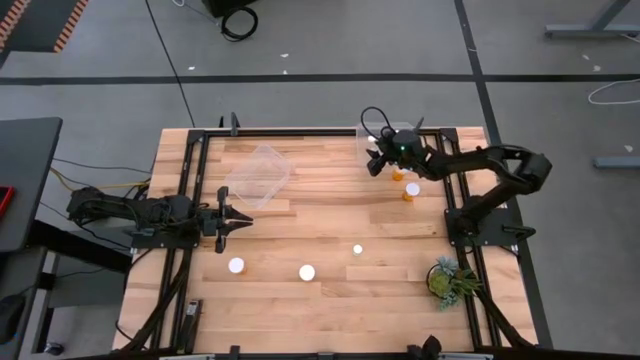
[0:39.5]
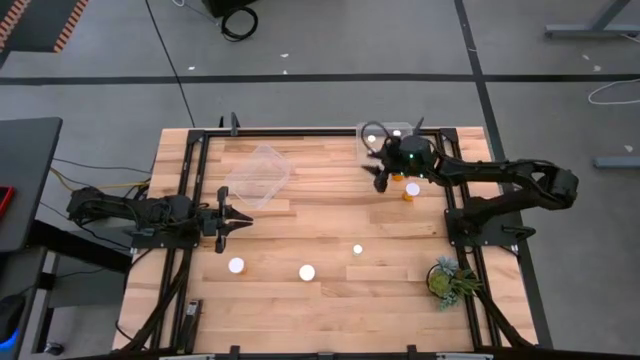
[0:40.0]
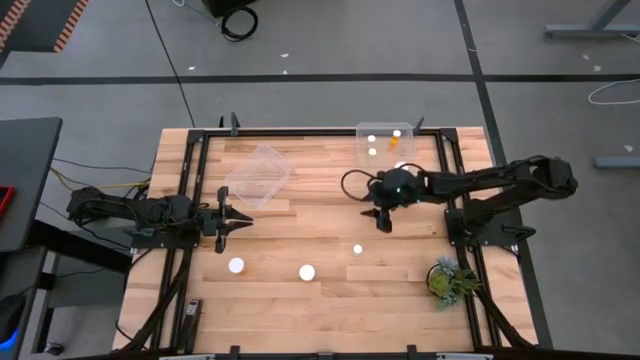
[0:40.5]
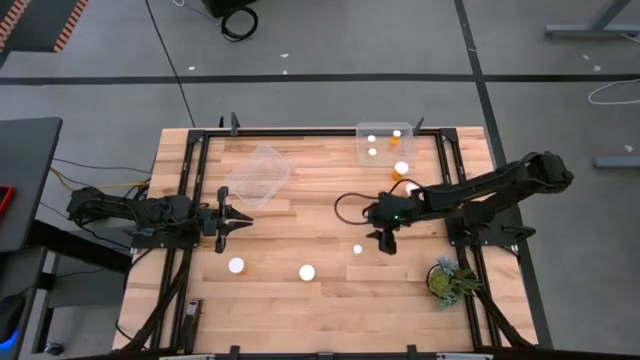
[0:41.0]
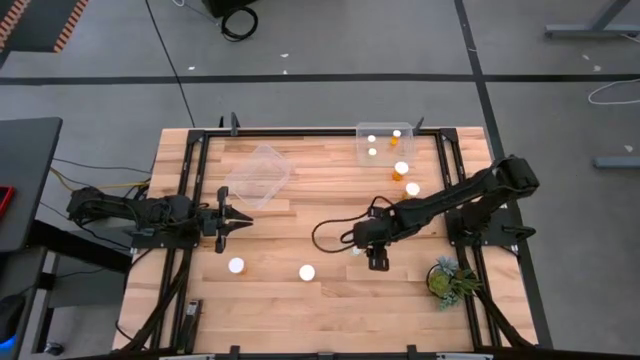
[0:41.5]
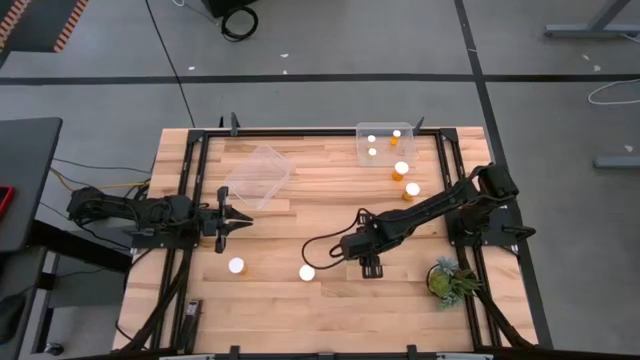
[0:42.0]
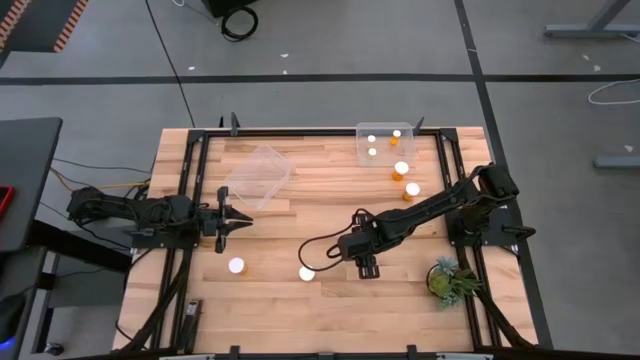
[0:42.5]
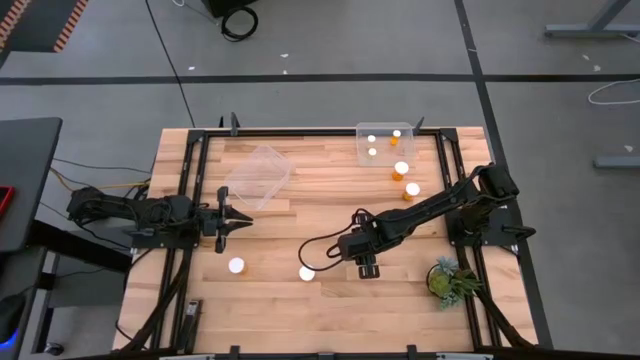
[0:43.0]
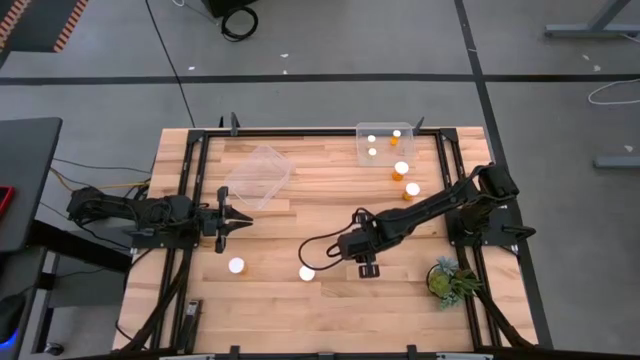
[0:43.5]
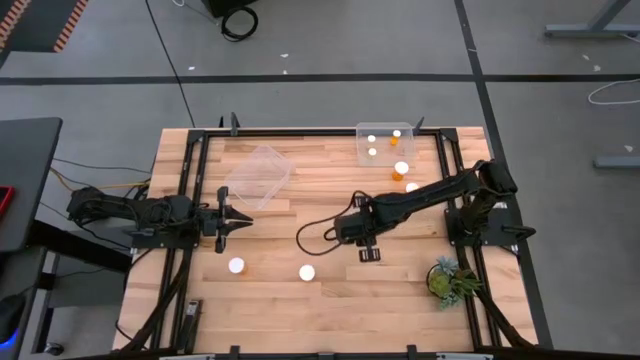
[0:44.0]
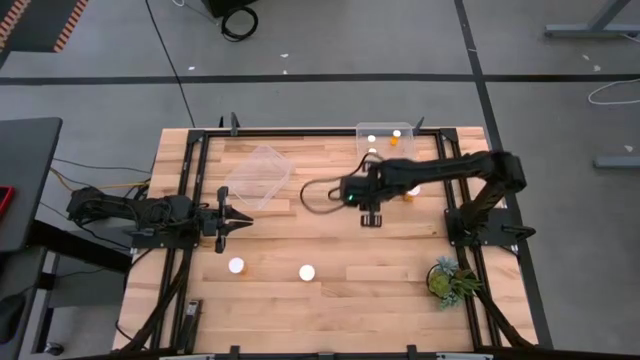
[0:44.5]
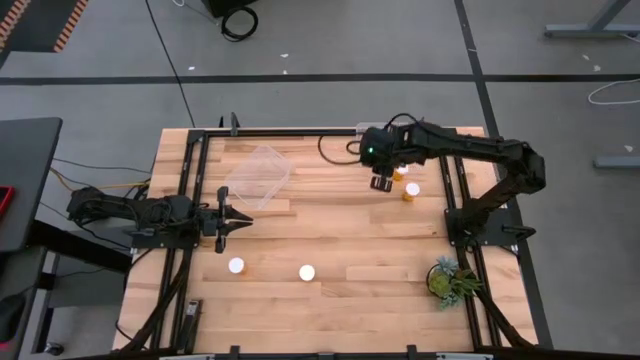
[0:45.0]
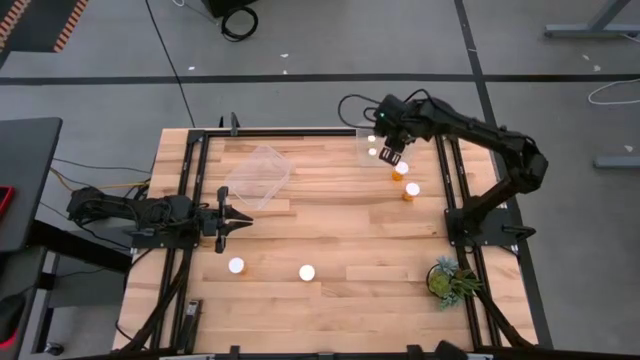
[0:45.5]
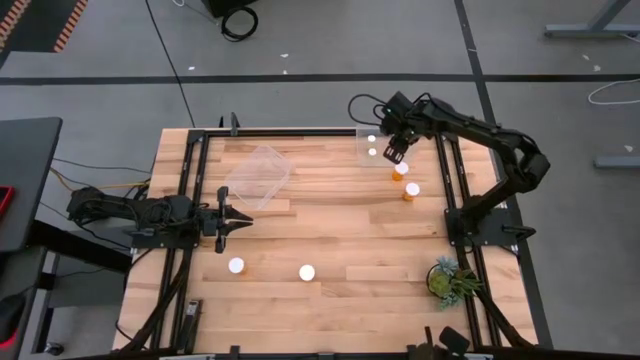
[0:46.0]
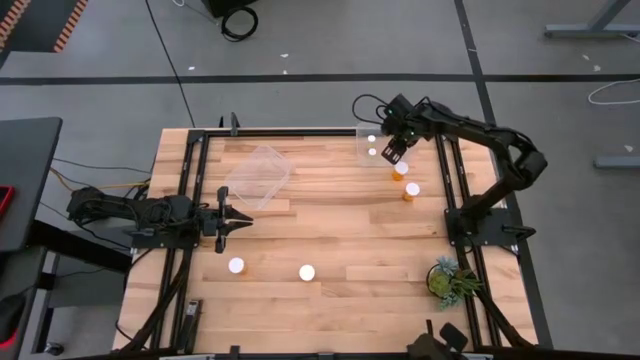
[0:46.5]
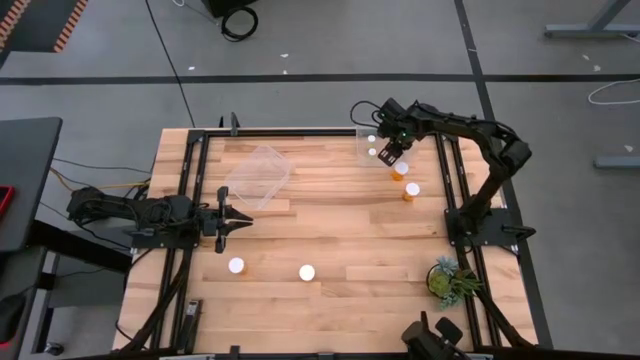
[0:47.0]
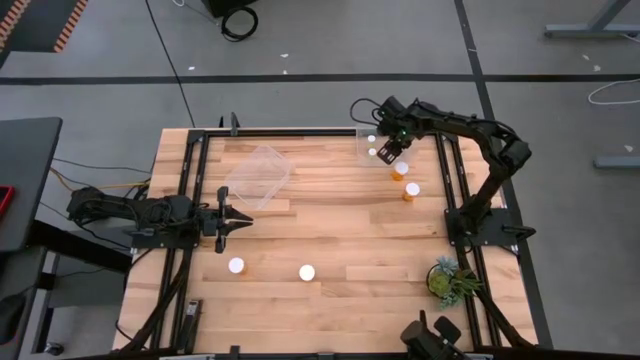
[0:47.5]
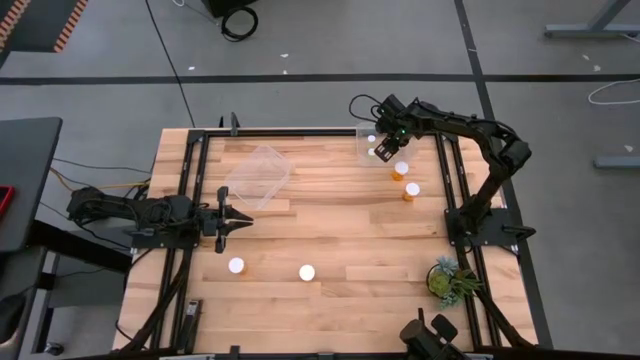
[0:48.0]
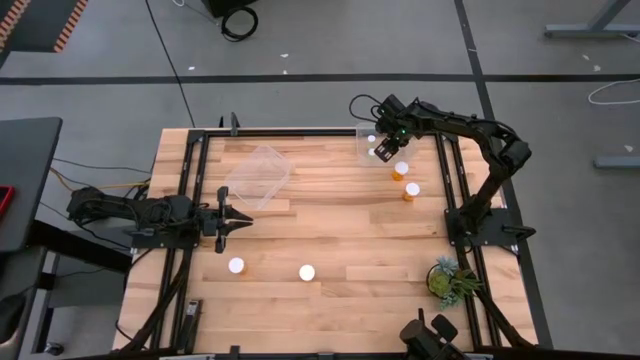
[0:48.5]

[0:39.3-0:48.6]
Task: Pick and place medicine bottles into bin by pill shape (circle, oval)
Put the wide yellow pill bottle into the right transparent bin

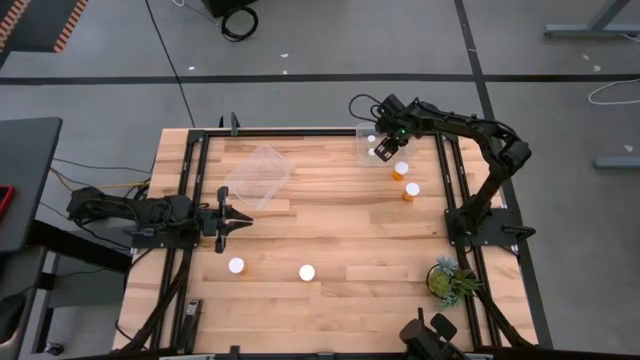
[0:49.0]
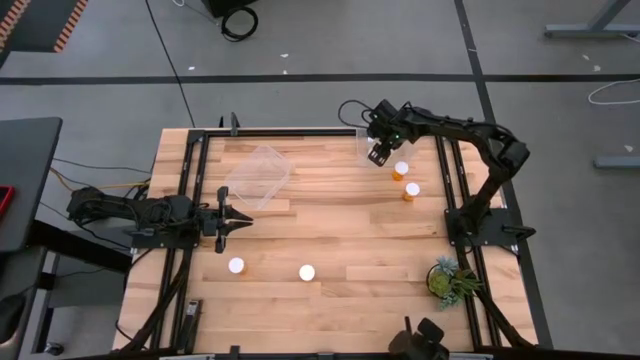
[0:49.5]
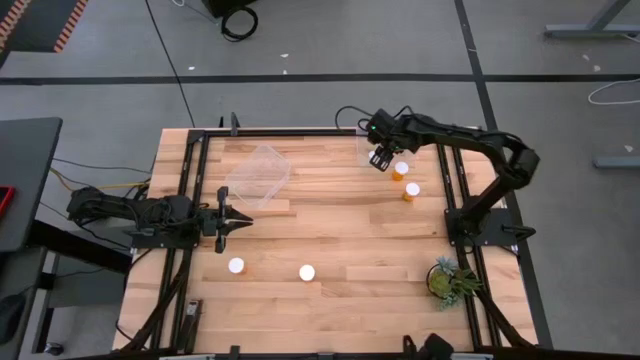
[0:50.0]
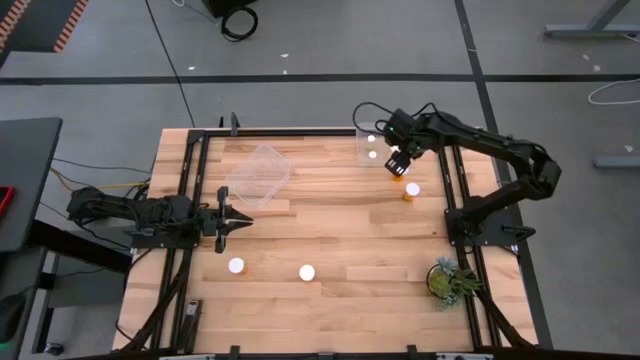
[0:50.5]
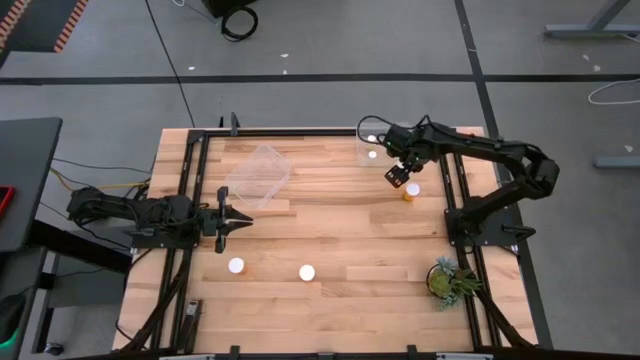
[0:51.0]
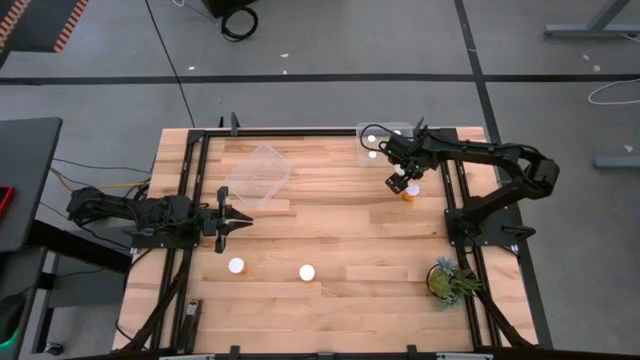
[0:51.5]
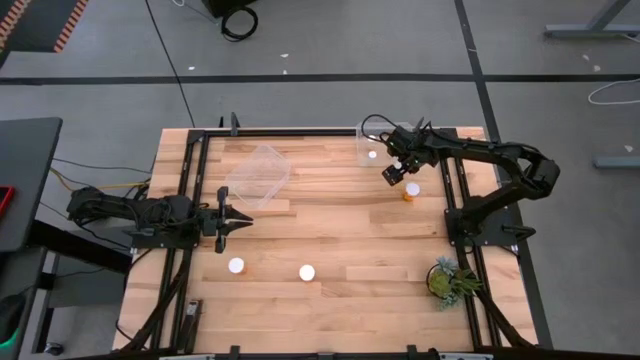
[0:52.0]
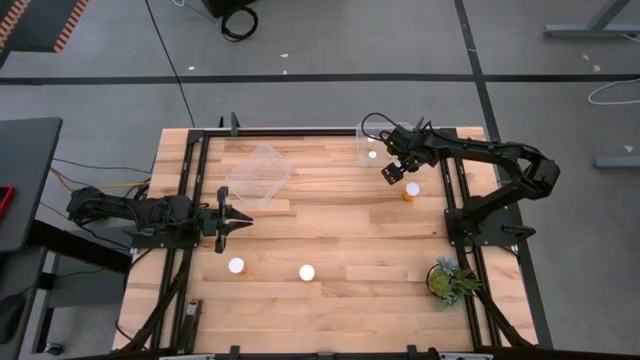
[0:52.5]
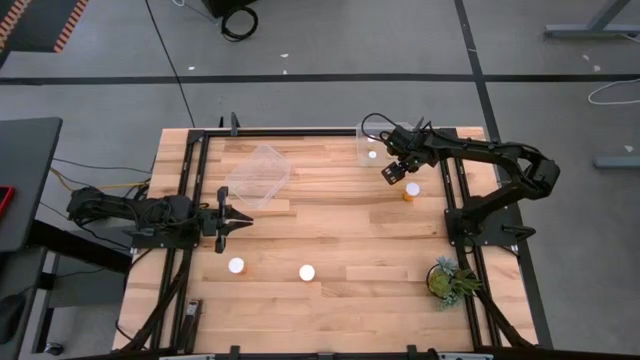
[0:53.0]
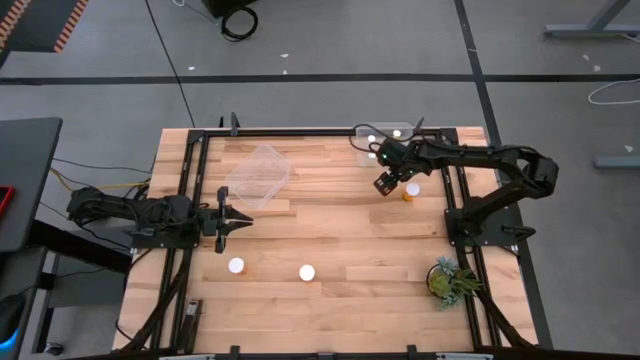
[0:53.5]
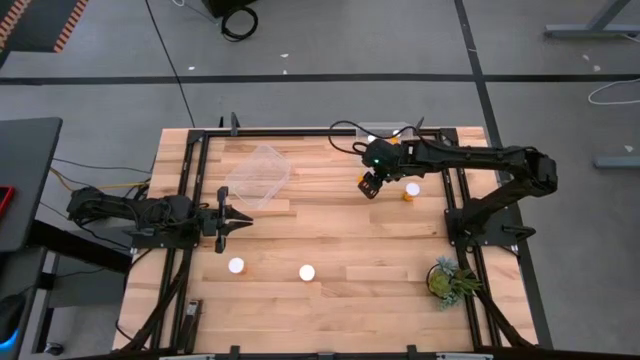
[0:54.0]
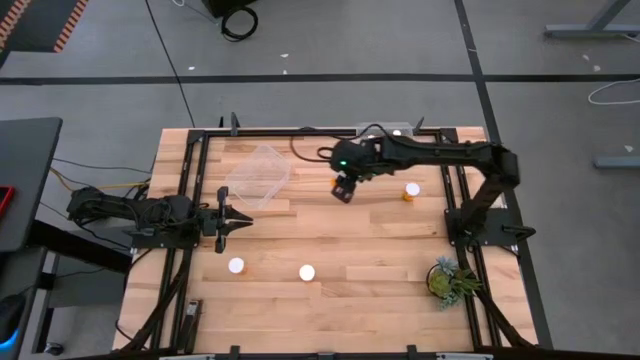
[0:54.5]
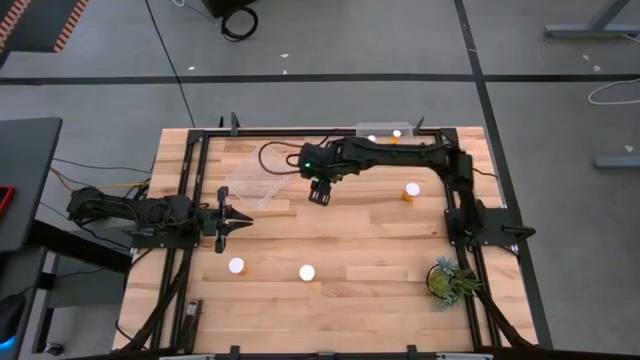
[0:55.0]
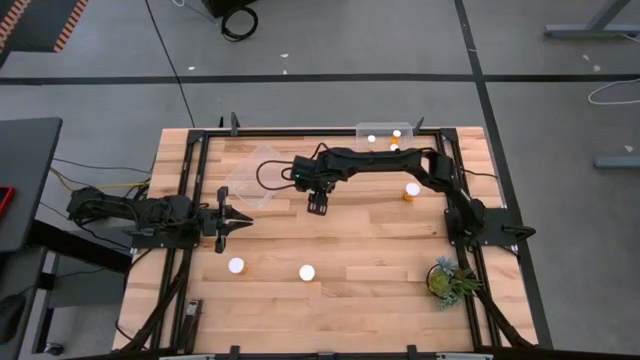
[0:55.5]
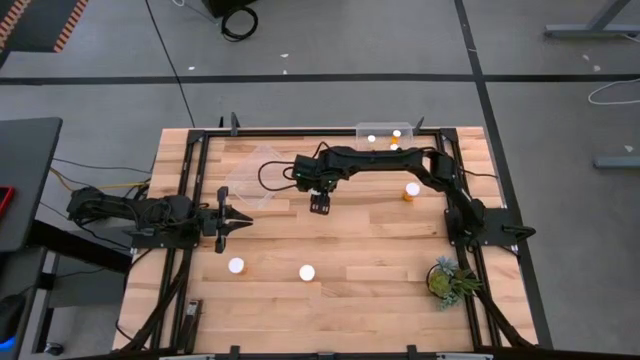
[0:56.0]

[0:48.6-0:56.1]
Move the wide orange pill bottle to the center of the table

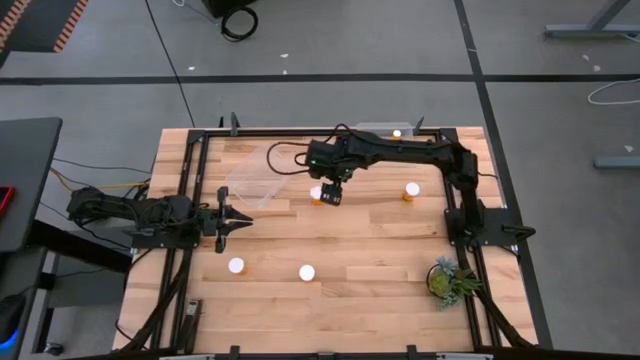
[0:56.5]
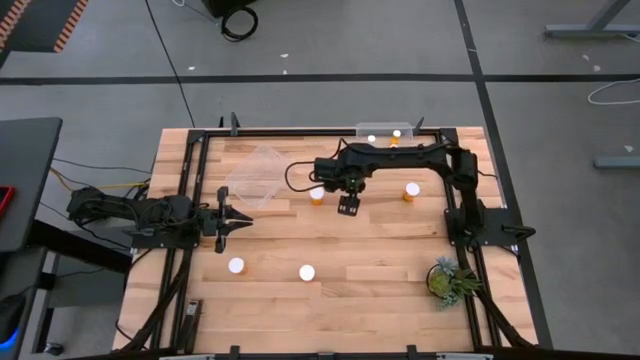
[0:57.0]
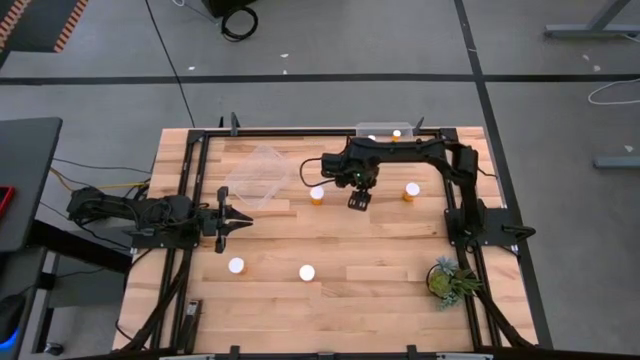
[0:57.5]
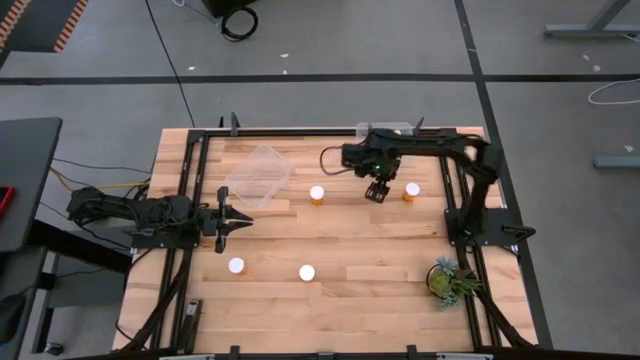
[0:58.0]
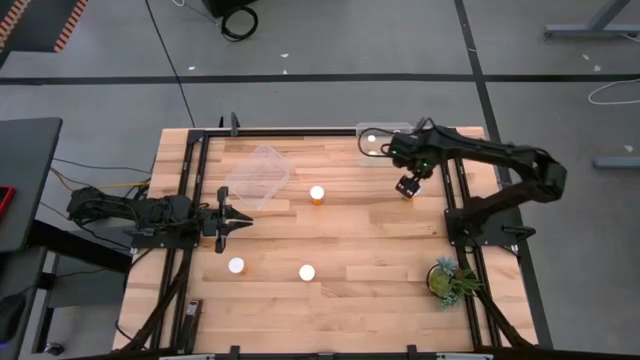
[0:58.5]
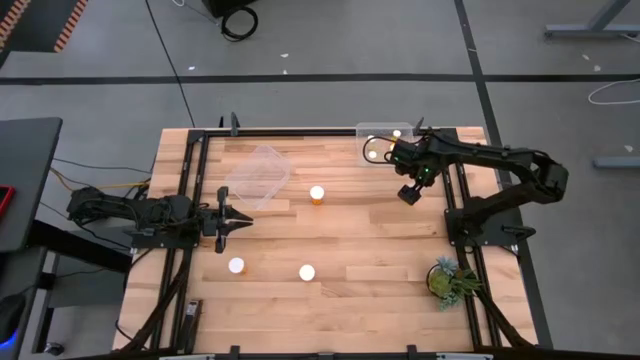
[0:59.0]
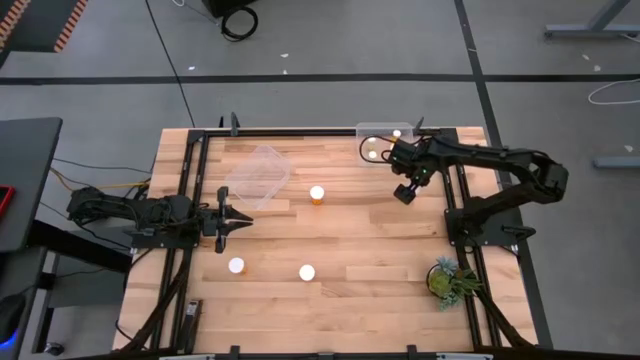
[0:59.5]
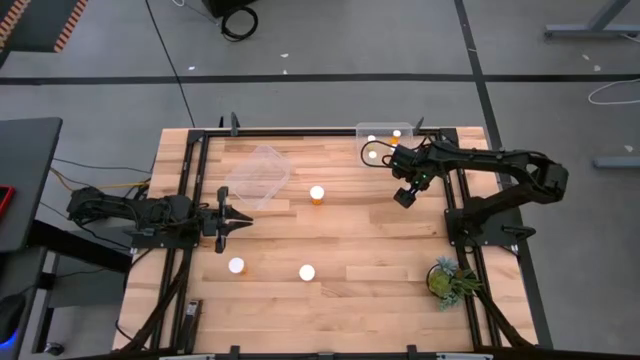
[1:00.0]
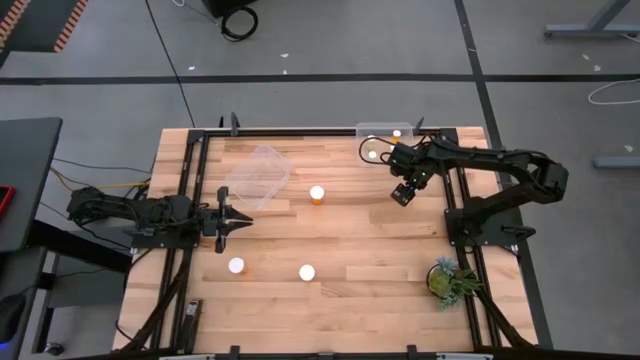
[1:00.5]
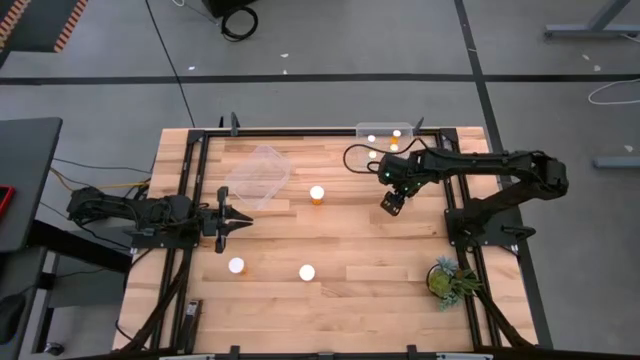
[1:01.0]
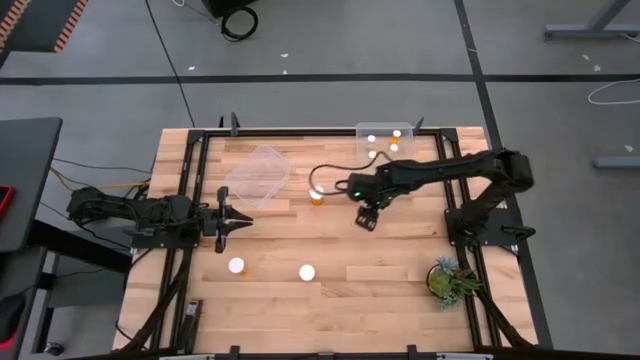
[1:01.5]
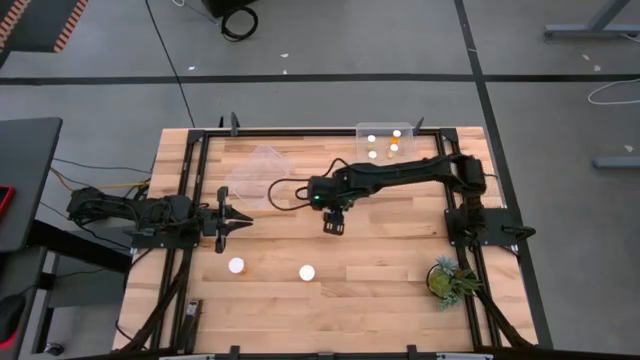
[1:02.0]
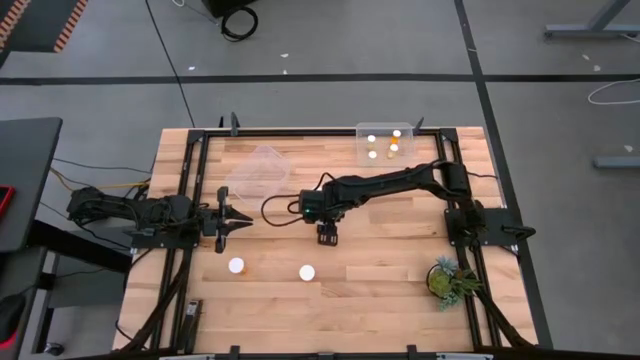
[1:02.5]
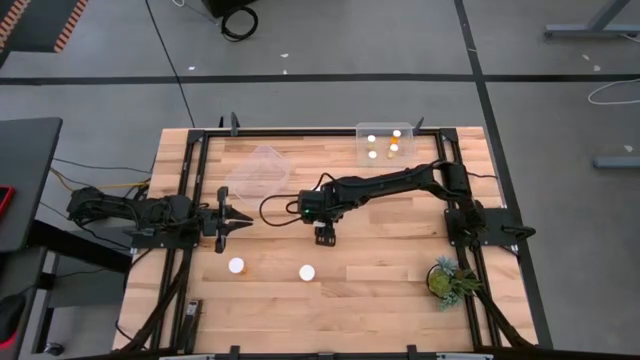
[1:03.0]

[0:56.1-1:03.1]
Move the orange pill bottle to the center of the table
